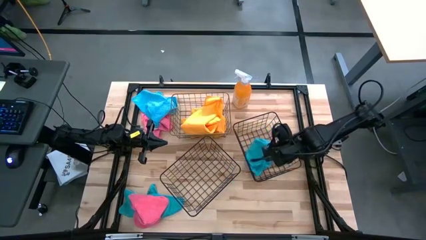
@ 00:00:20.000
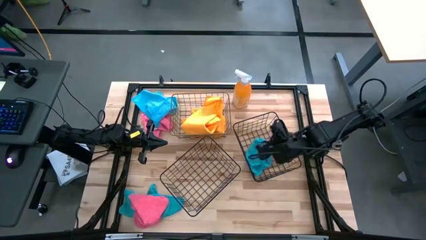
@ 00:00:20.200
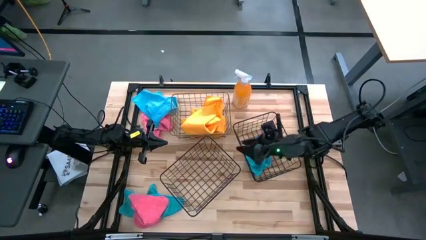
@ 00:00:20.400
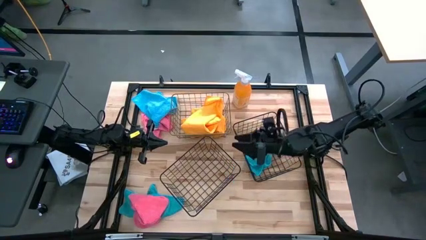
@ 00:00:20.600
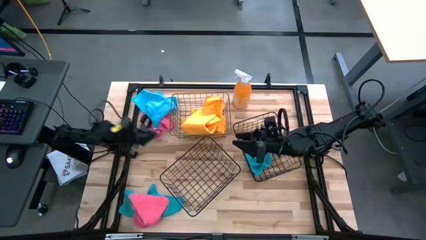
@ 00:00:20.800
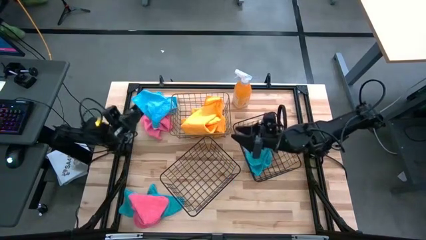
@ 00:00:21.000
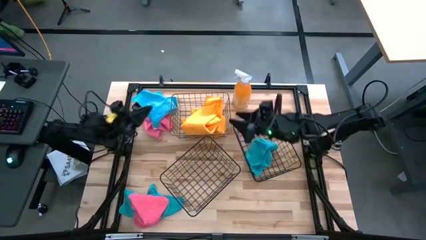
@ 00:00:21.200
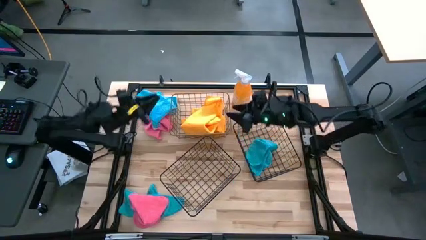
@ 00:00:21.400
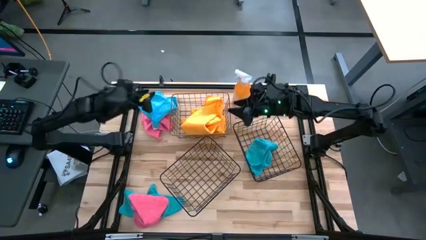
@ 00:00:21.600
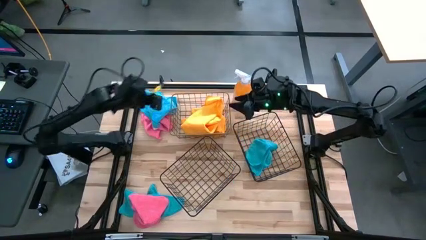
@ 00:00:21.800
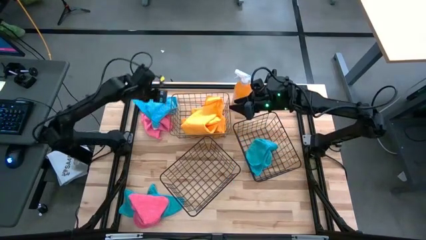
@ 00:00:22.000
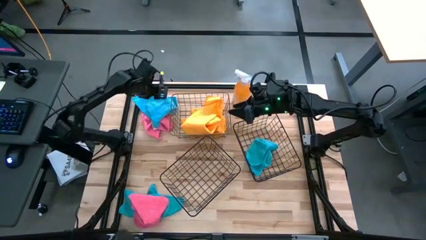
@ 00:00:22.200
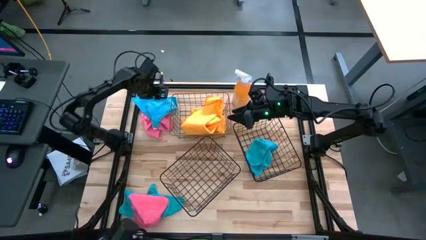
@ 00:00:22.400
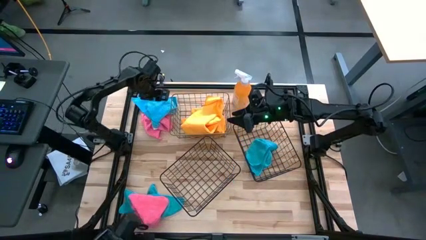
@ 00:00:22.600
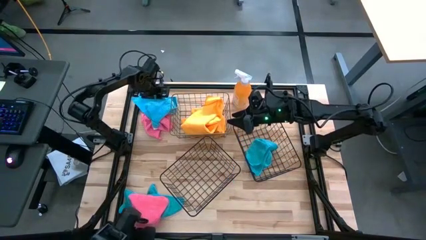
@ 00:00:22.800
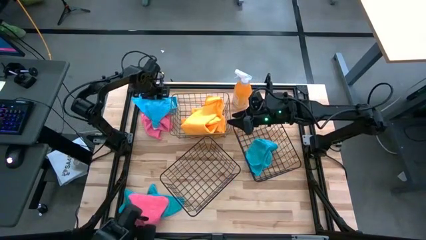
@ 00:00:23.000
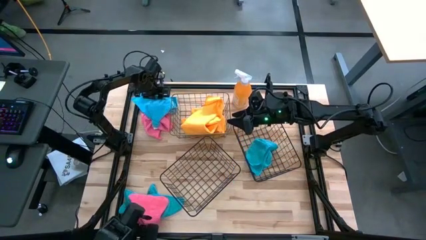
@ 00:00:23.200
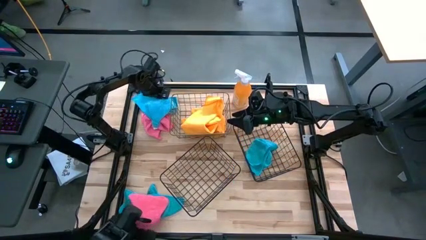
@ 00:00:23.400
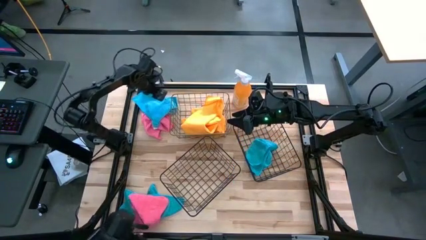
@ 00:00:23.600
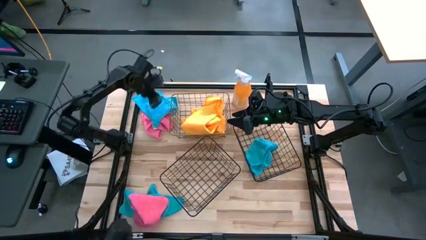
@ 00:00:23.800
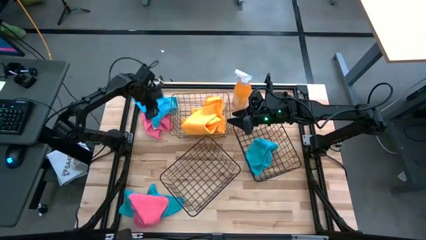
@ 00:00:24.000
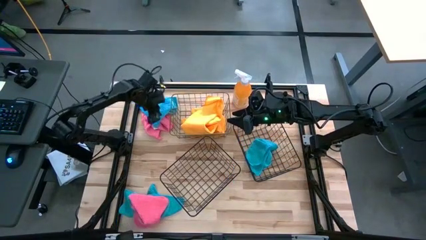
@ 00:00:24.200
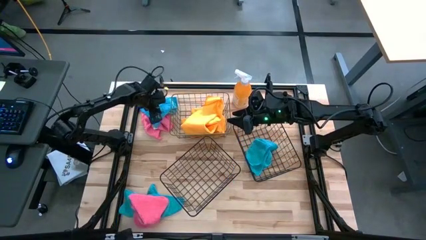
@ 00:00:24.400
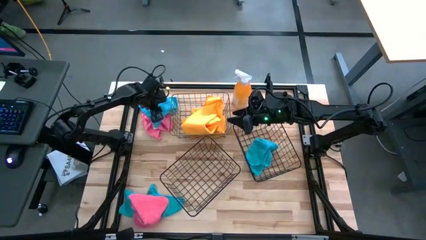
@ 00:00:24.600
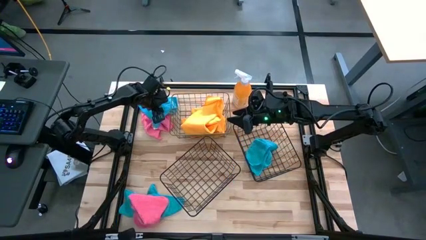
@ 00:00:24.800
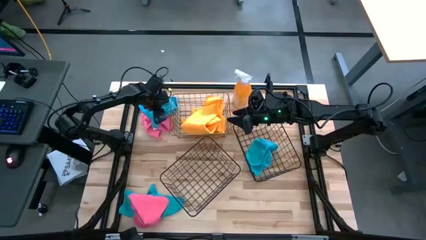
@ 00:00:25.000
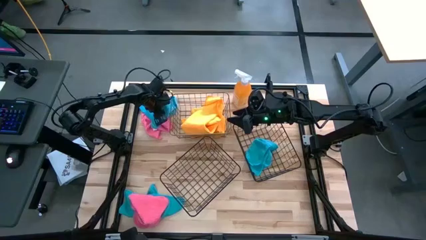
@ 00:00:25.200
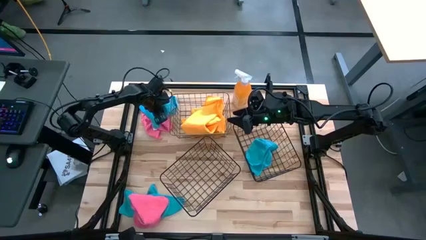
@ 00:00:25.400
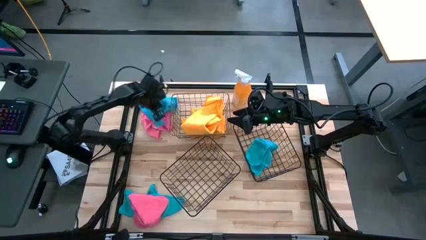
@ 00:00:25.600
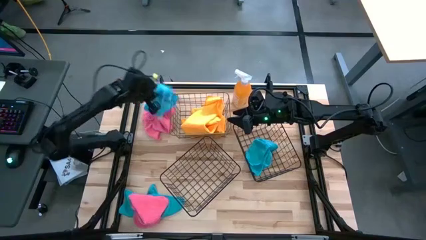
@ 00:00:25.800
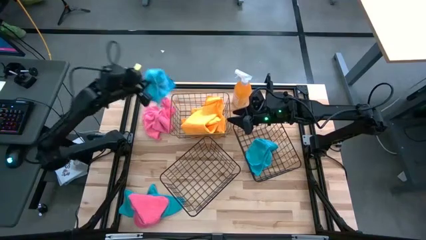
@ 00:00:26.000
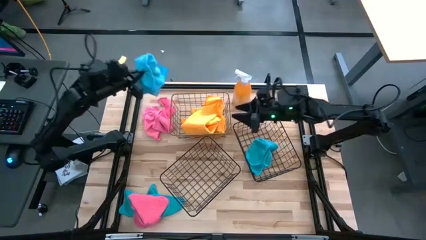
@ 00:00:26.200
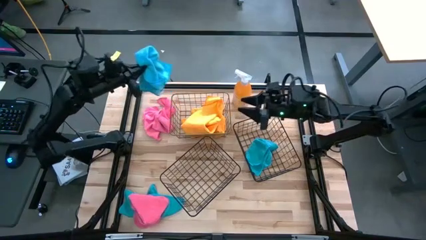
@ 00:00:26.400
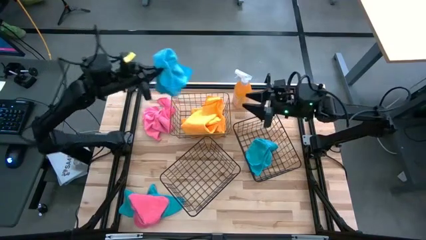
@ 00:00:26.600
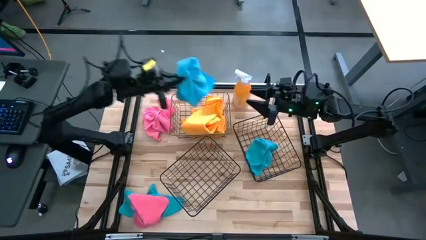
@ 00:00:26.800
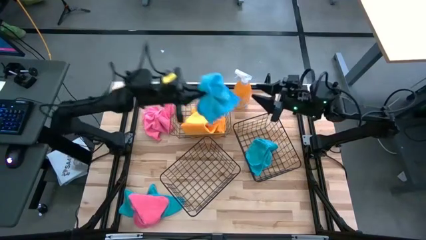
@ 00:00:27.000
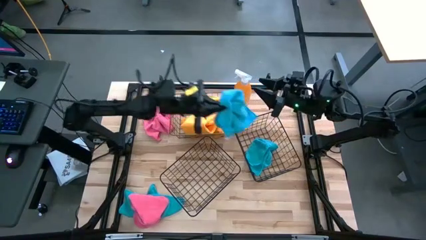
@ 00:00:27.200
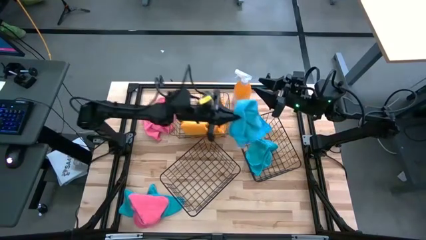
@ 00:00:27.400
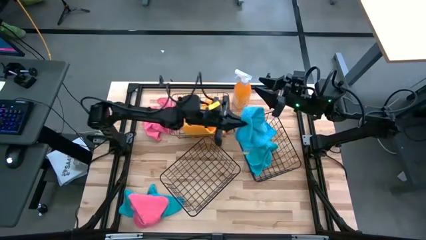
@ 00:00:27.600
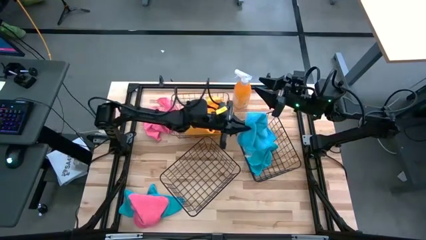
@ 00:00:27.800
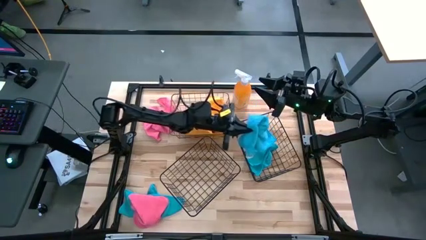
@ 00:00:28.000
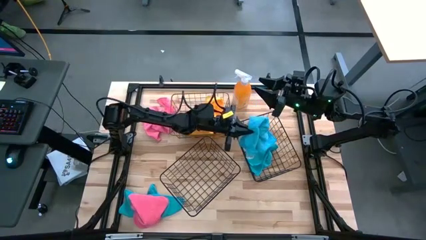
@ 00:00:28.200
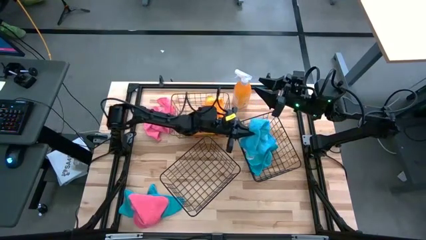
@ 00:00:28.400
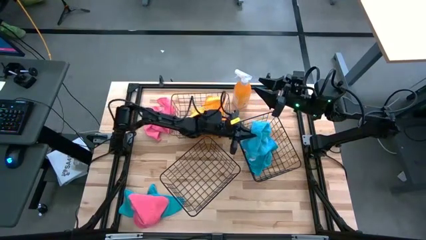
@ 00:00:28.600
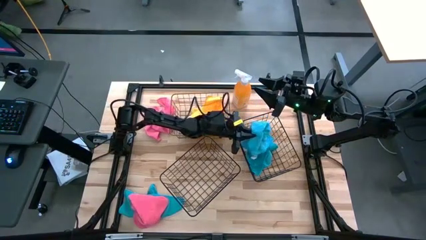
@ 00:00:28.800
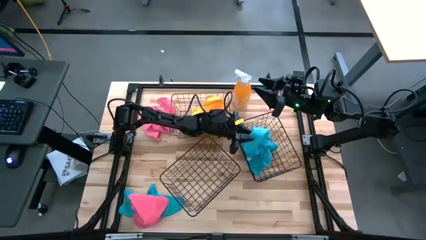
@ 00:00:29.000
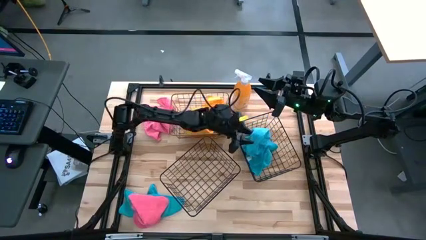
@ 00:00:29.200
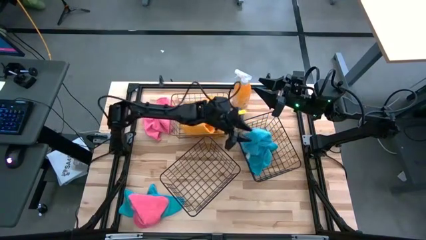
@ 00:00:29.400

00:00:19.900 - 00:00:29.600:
Task: Sort microfiber towel by color & place in baskets
Put the top blue microfiber cloth into the right black basket

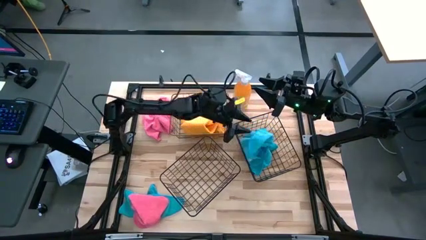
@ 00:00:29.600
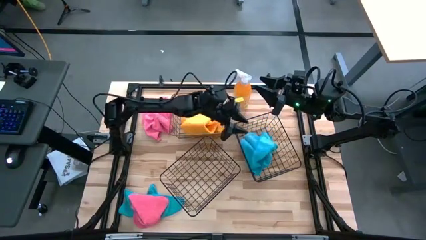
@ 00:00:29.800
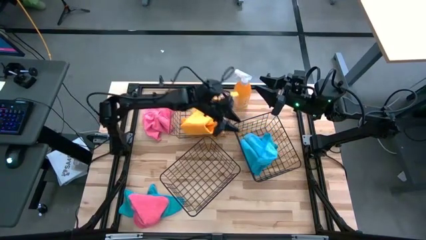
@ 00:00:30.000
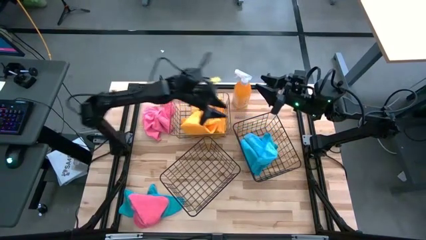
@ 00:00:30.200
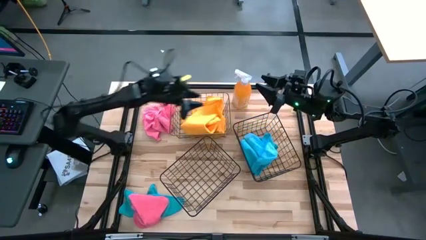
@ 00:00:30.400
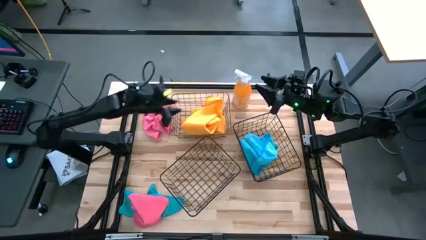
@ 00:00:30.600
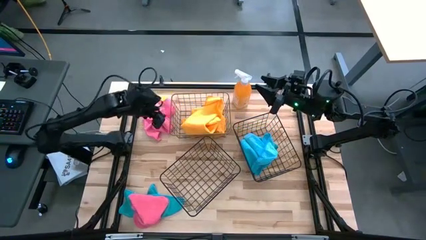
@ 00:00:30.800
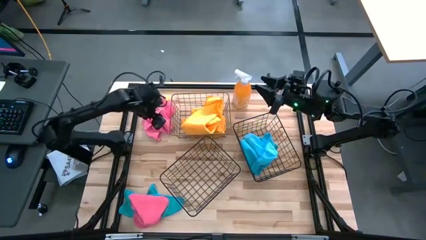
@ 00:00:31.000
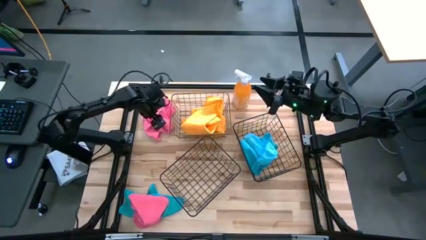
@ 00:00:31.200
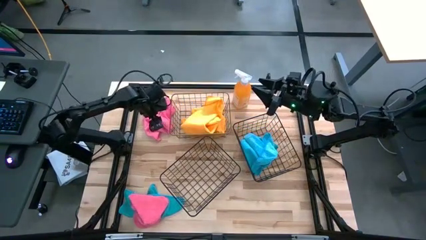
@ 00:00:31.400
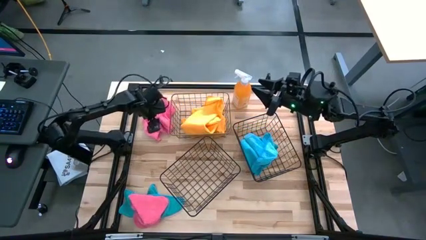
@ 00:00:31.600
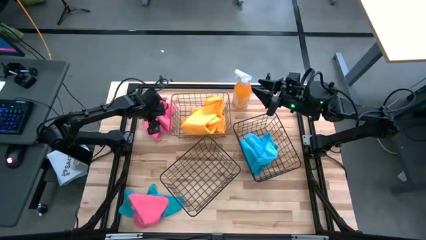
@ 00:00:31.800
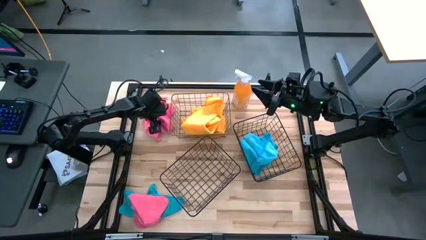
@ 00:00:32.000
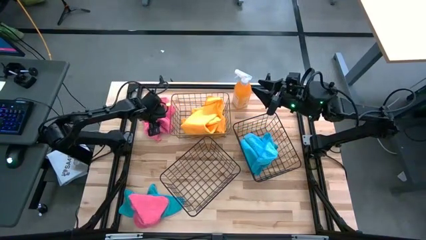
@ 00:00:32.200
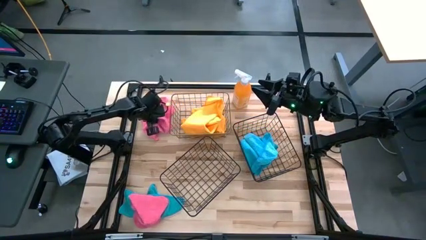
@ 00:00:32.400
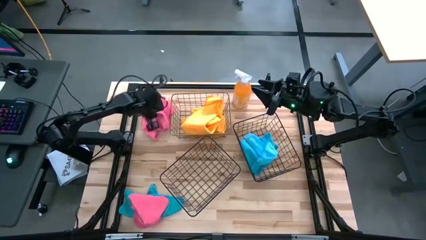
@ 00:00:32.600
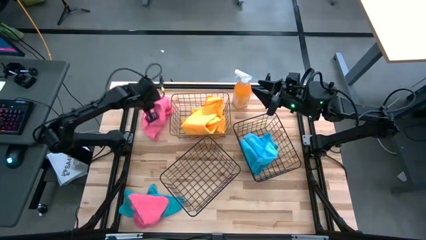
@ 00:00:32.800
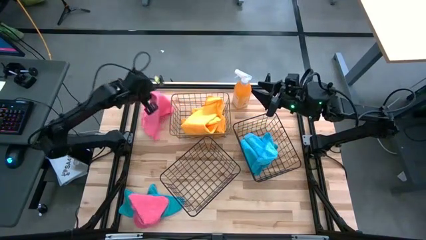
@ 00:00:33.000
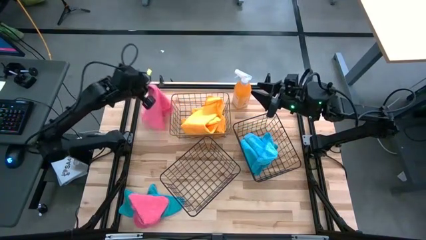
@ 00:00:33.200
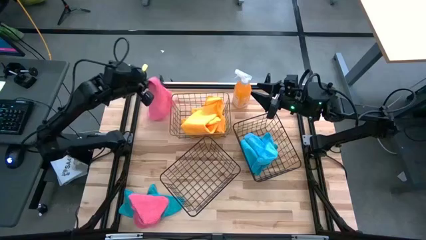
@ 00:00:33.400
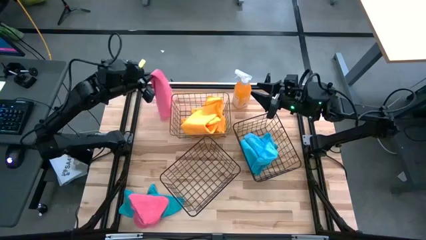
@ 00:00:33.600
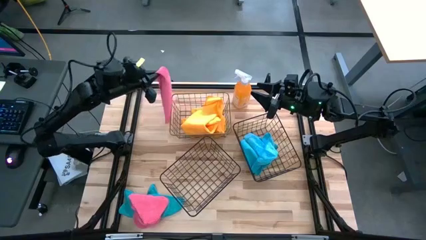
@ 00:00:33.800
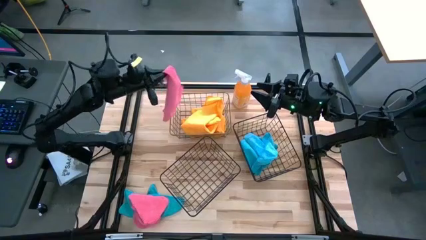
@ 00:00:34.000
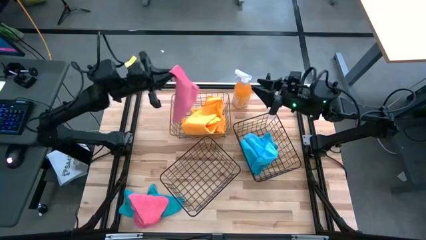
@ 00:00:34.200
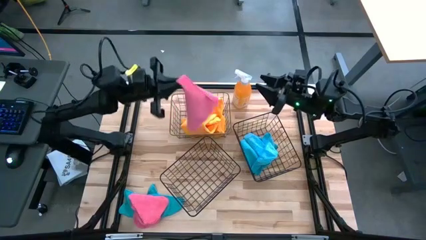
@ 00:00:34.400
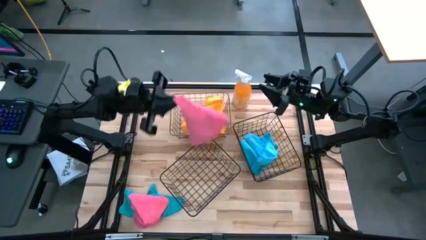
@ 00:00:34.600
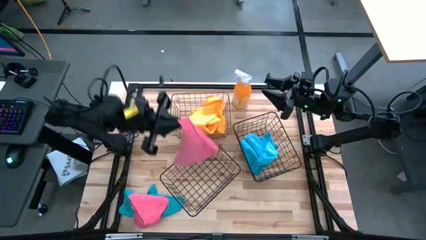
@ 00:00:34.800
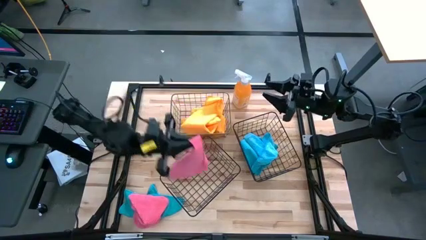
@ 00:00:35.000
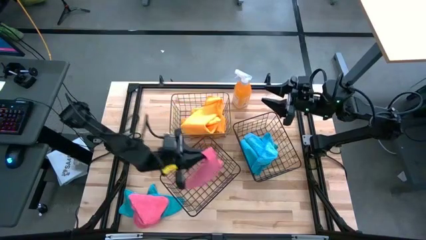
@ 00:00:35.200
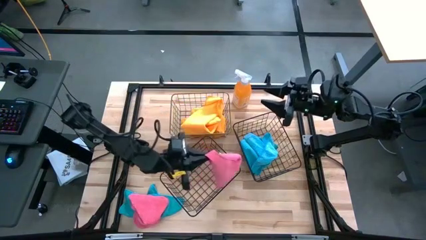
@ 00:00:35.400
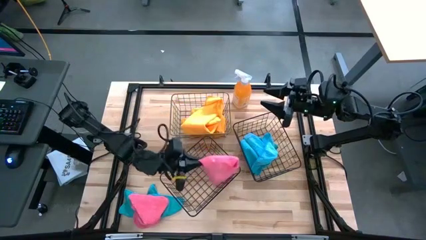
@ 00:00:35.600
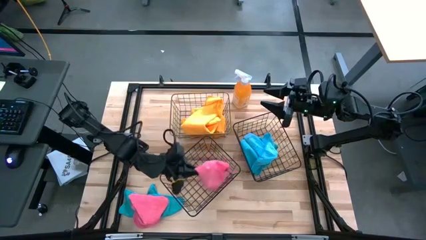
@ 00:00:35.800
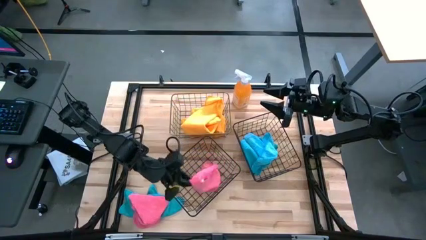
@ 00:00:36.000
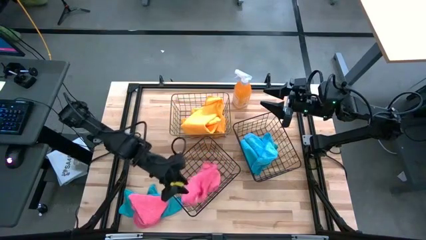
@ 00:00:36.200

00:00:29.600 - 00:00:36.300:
Put the top pink microfiber cloth into the left black basket
